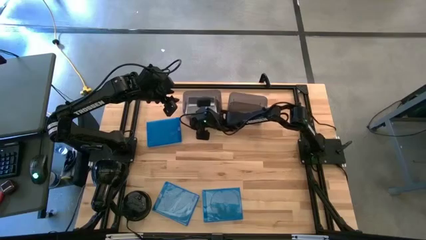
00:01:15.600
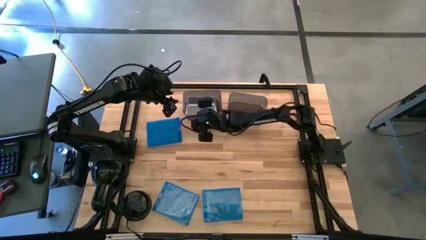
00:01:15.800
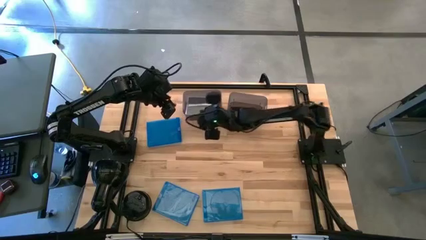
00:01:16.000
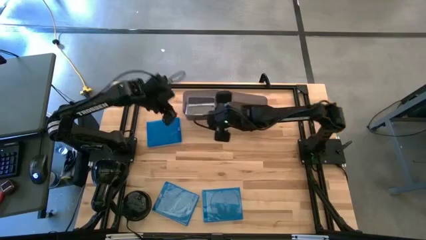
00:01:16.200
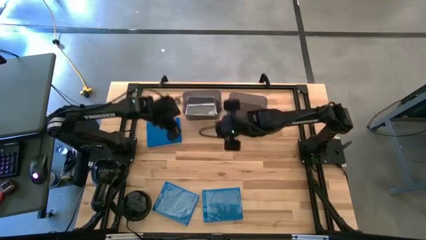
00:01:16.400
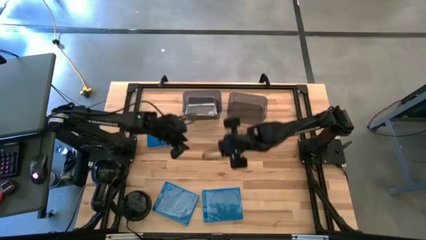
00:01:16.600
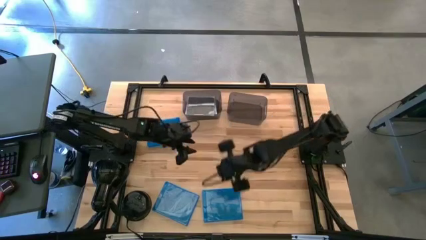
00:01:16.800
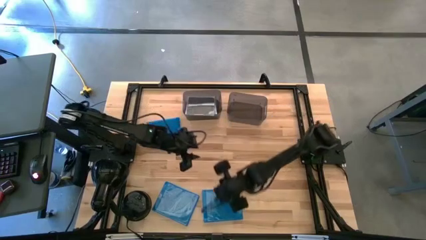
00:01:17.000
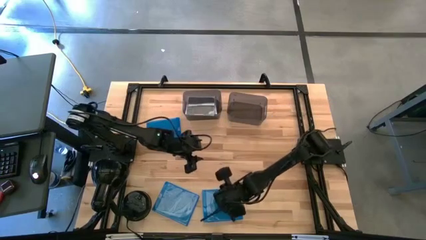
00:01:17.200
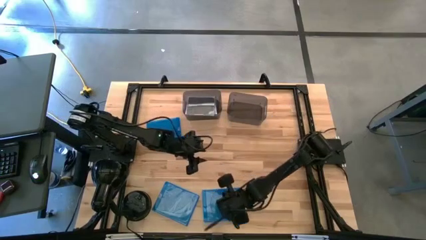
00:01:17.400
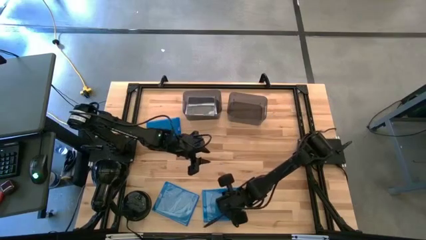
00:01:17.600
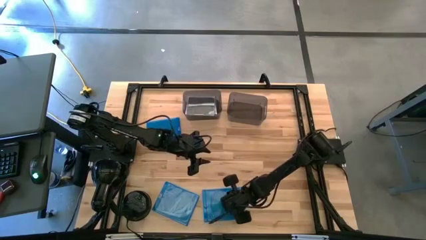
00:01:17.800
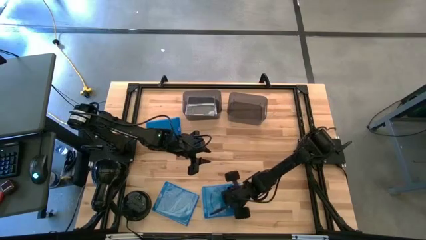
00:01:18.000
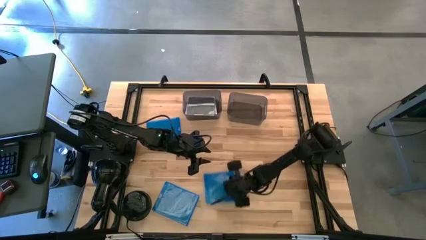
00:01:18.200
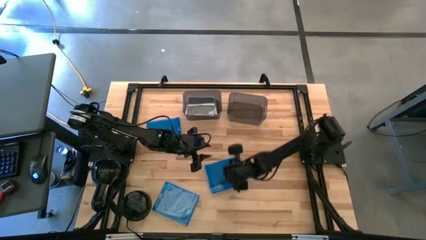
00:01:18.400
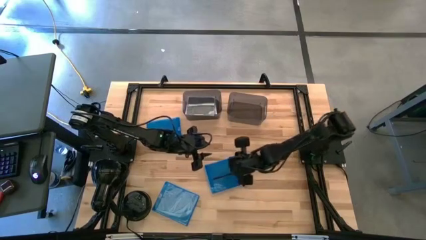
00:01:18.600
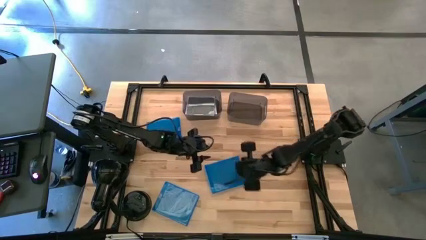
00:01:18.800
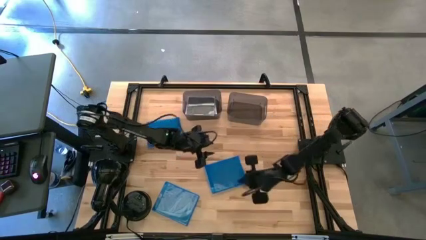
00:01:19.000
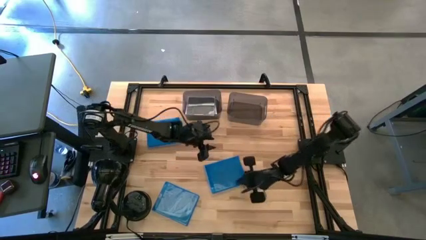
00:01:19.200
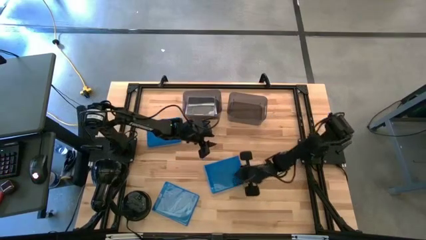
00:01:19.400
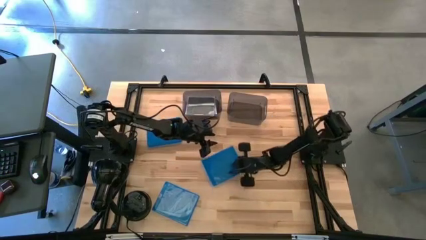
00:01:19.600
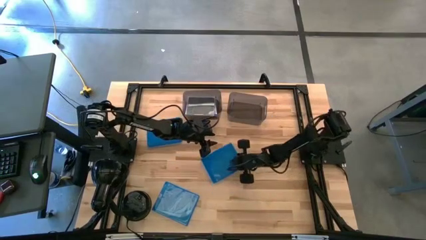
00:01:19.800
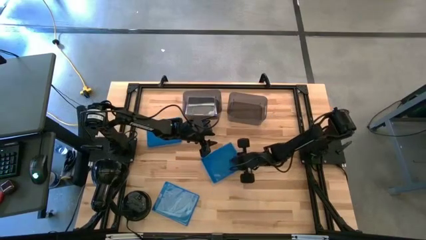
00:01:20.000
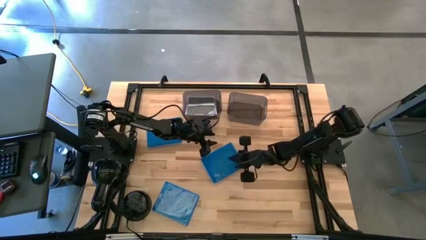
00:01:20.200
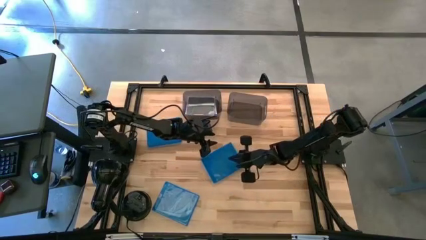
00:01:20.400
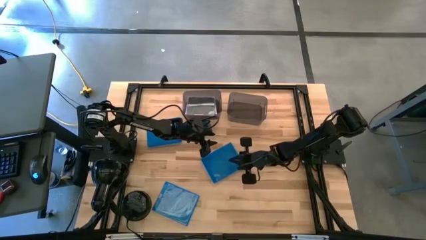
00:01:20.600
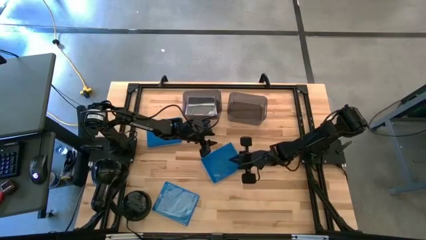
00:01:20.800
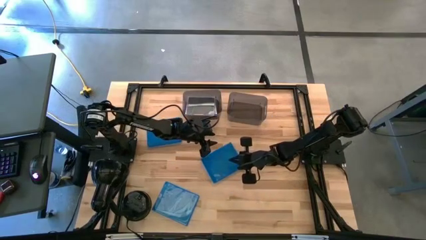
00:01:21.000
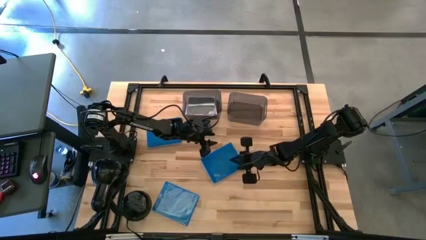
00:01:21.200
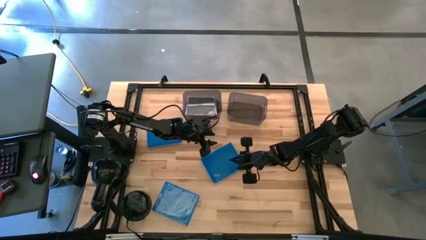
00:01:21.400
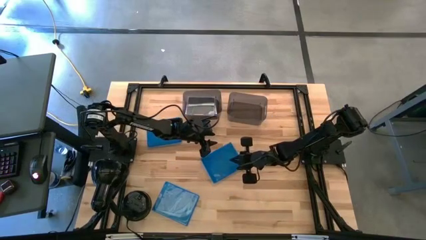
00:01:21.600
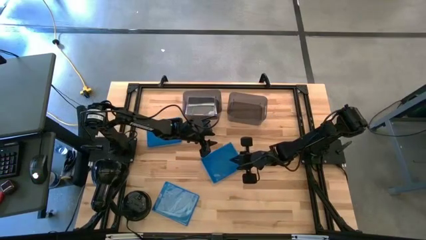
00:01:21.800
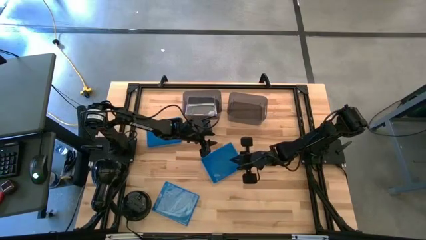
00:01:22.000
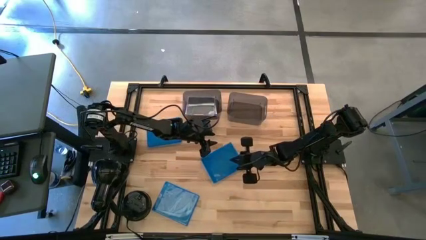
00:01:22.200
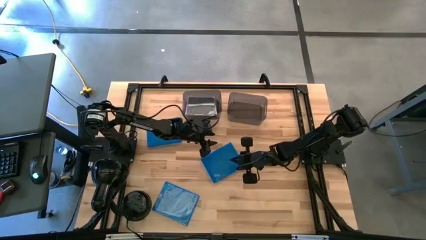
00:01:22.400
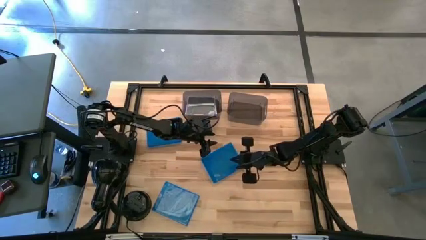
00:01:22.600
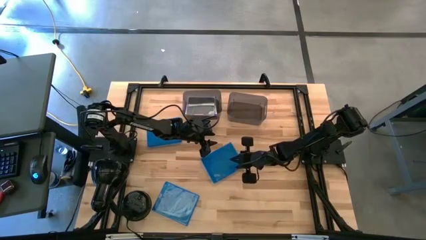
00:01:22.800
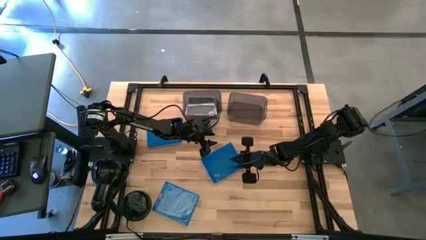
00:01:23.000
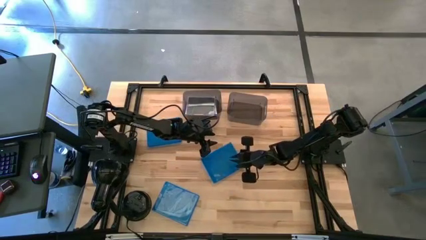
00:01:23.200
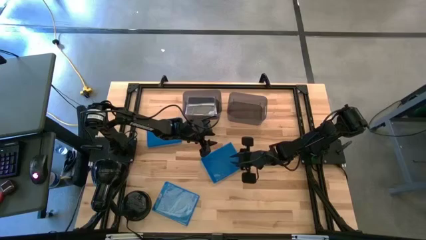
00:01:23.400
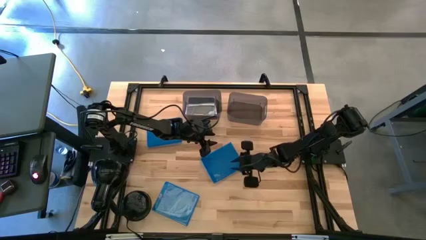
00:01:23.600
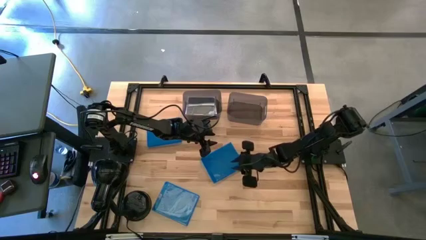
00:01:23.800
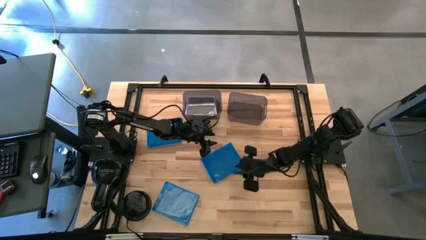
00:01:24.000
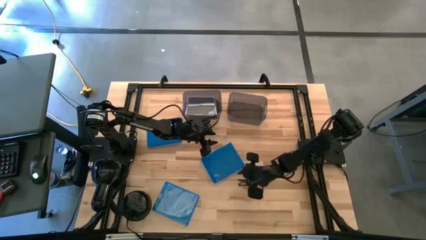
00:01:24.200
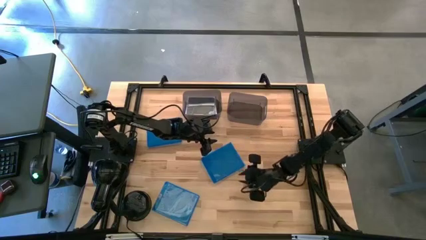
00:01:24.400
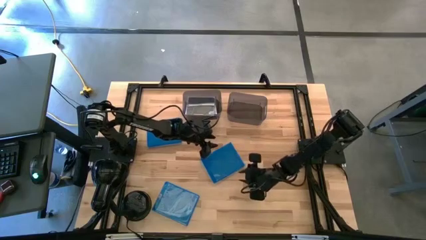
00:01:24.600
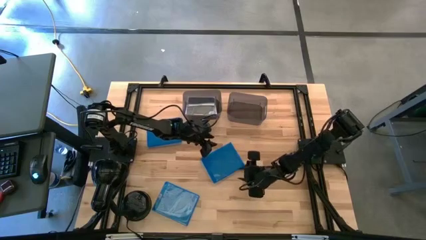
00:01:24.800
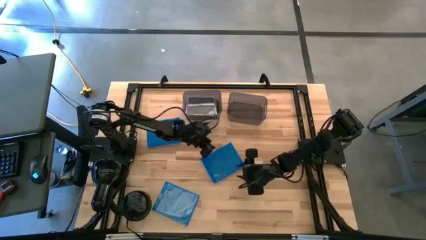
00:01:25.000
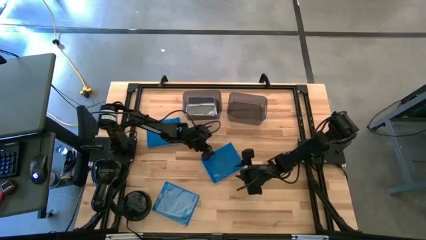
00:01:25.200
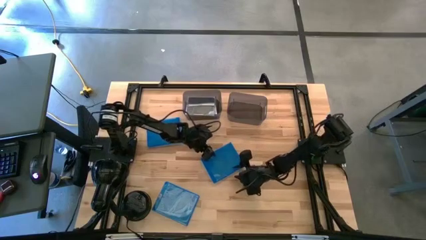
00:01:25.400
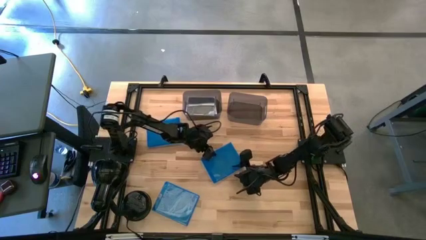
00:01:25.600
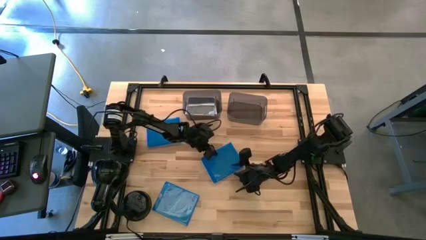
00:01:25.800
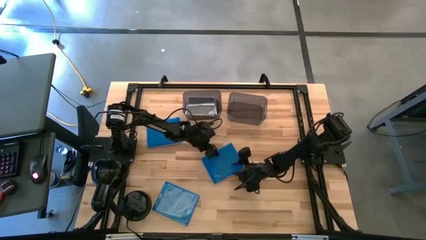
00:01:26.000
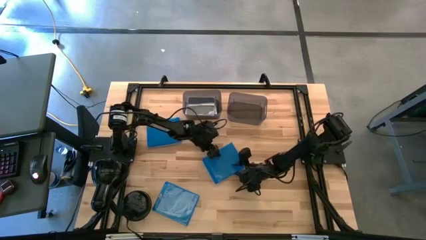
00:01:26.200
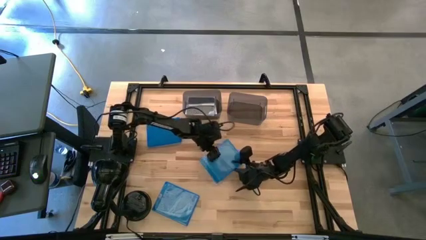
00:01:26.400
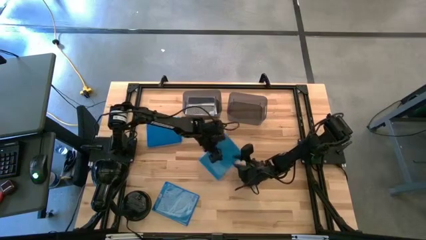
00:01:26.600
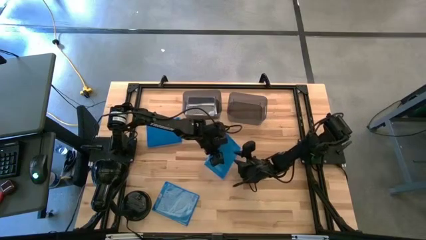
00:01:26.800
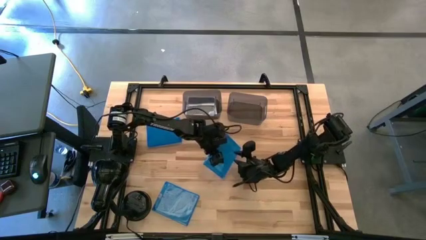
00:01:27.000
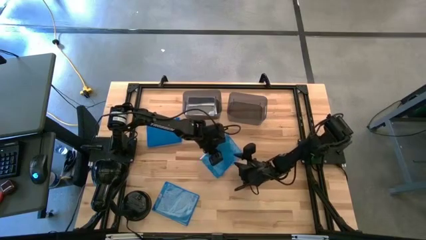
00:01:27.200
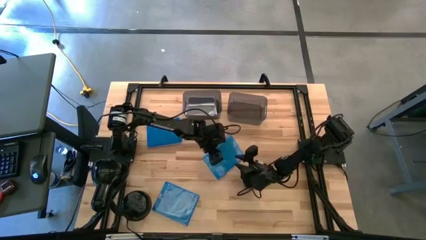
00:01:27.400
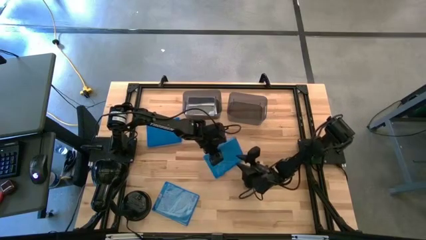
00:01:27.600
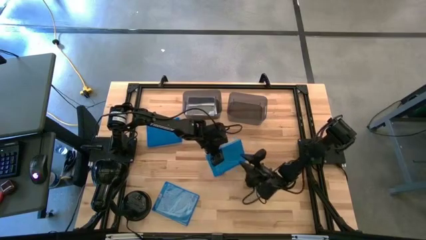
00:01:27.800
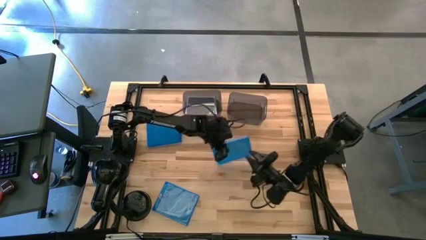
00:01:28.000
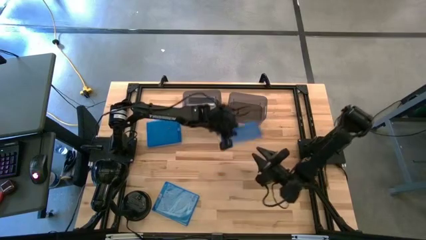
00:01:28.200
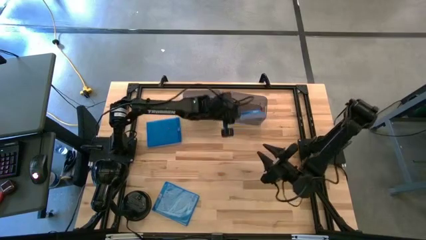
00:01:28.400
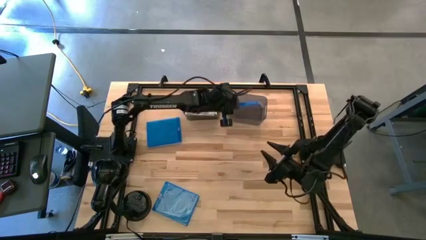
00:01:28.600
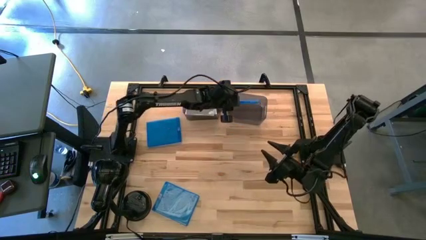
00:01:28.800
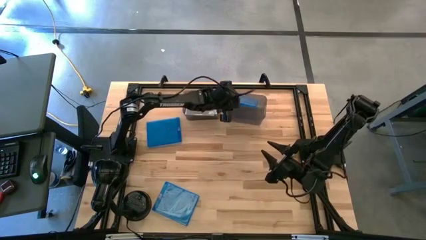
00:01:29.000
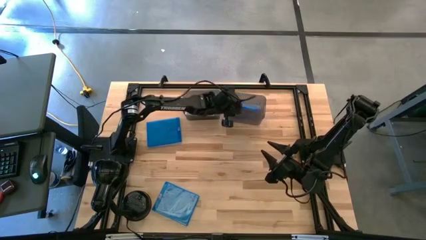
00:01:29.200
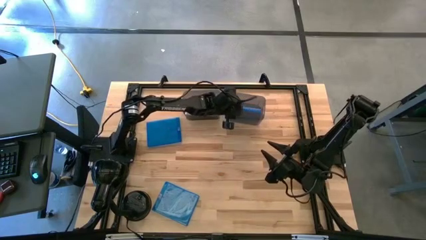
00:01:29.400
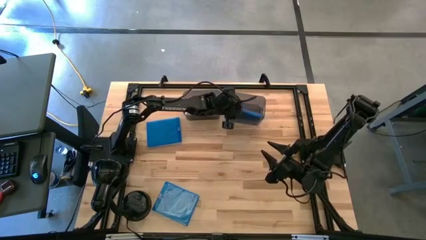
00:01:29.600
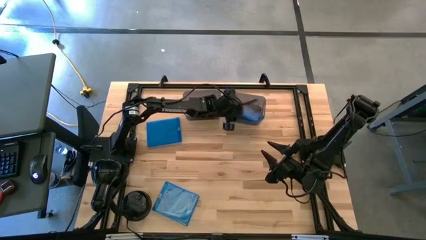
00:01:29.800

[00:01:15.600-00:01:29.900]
Task: Pick & place jewel cases by type
Put the bottom right blue CD case into the right black bin
